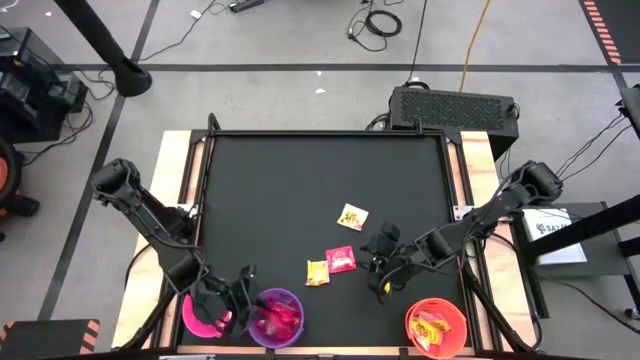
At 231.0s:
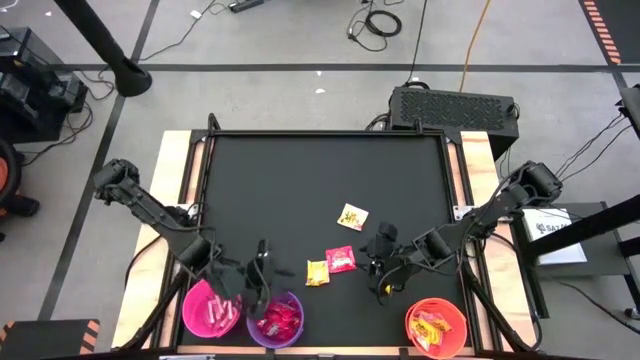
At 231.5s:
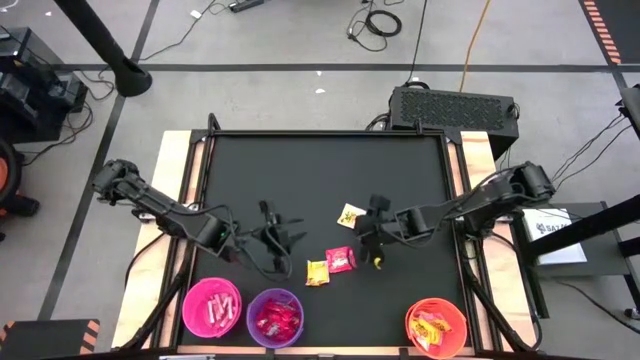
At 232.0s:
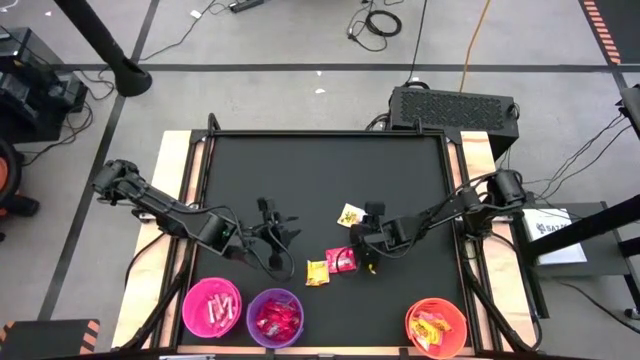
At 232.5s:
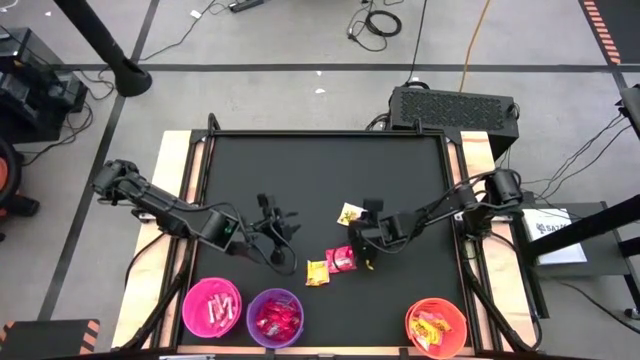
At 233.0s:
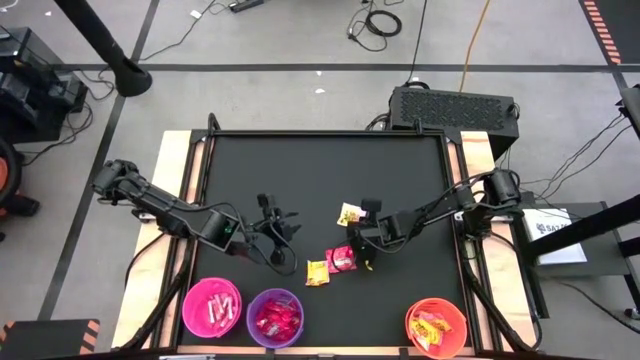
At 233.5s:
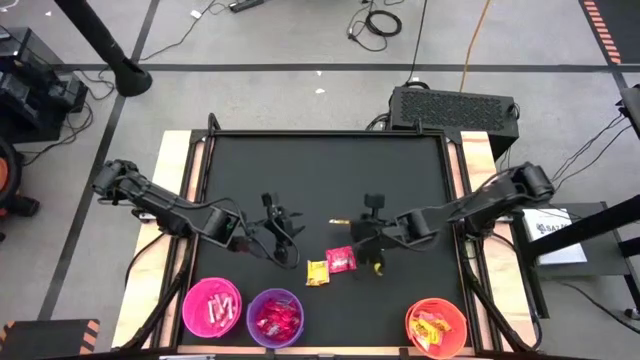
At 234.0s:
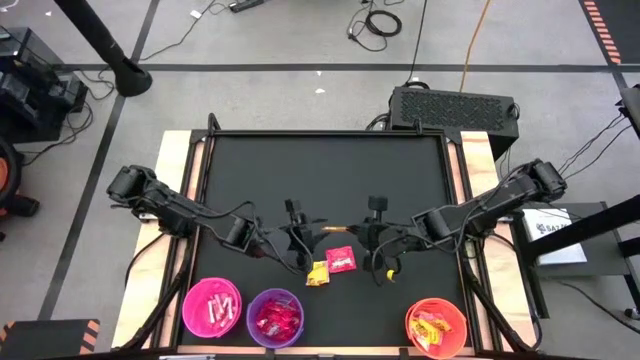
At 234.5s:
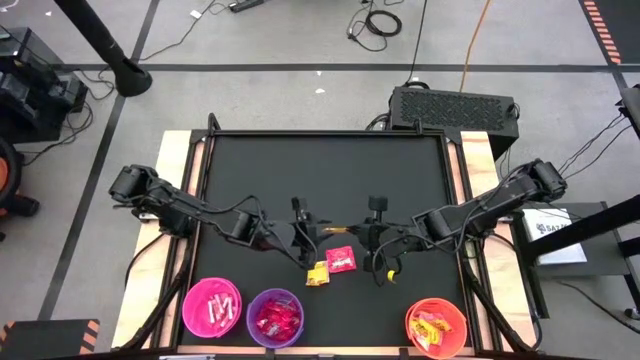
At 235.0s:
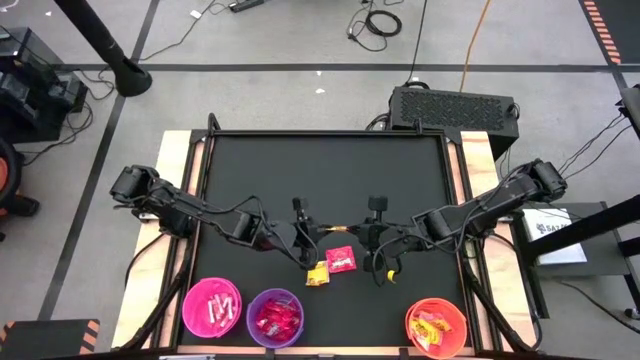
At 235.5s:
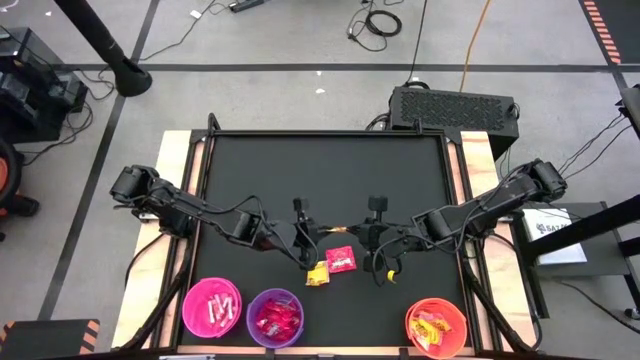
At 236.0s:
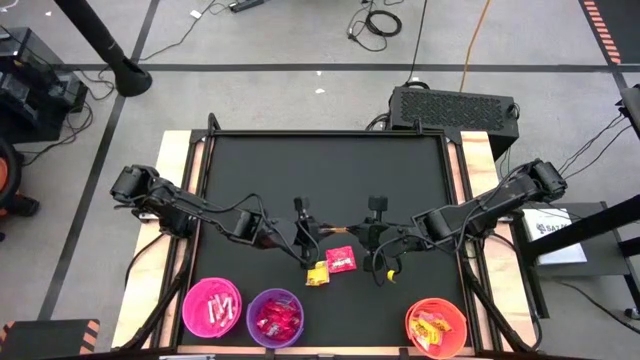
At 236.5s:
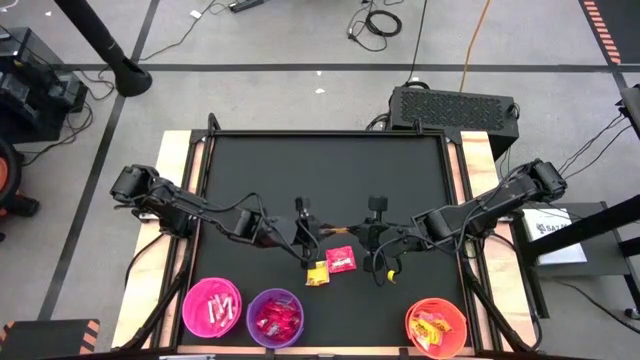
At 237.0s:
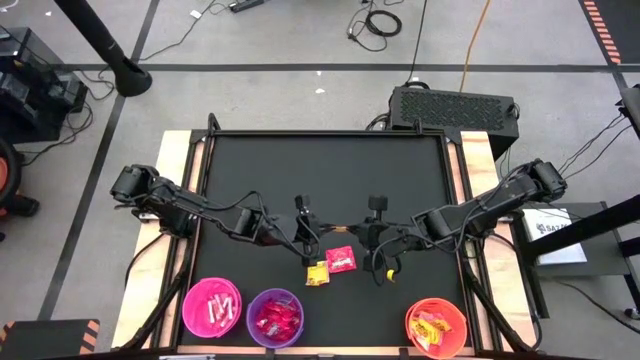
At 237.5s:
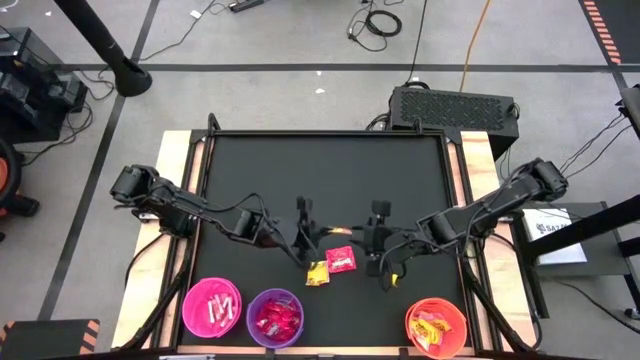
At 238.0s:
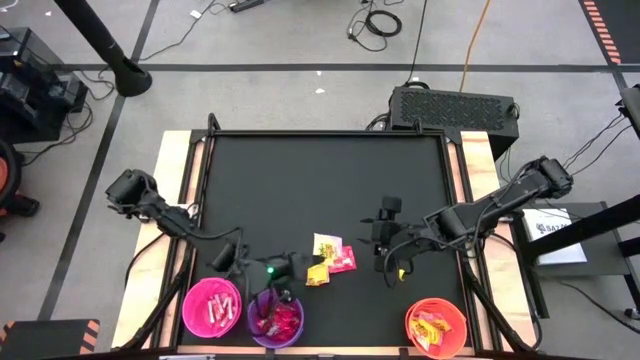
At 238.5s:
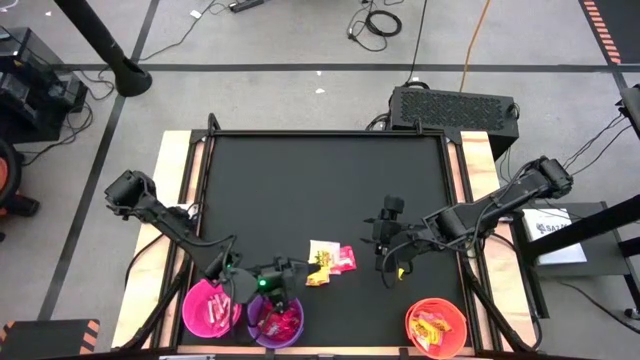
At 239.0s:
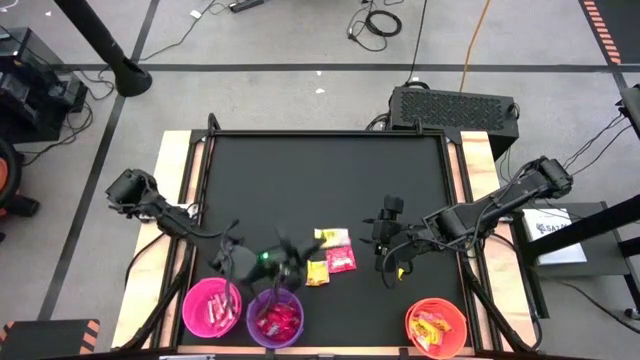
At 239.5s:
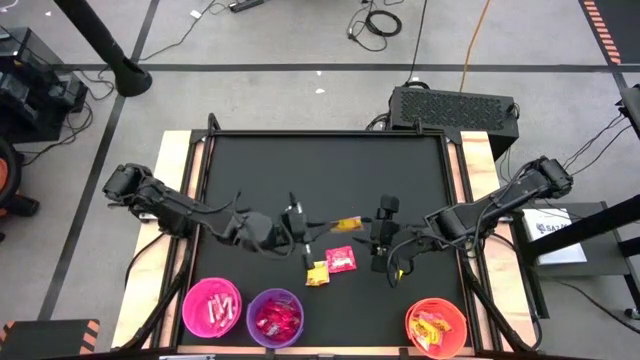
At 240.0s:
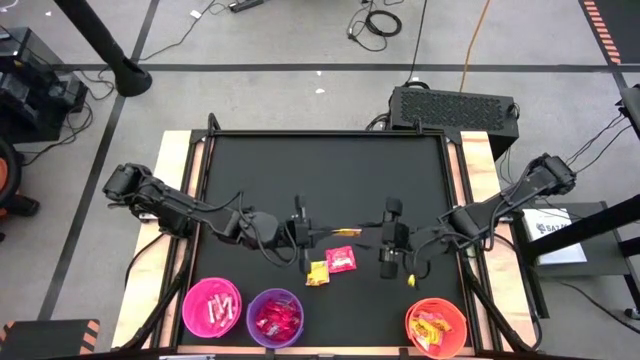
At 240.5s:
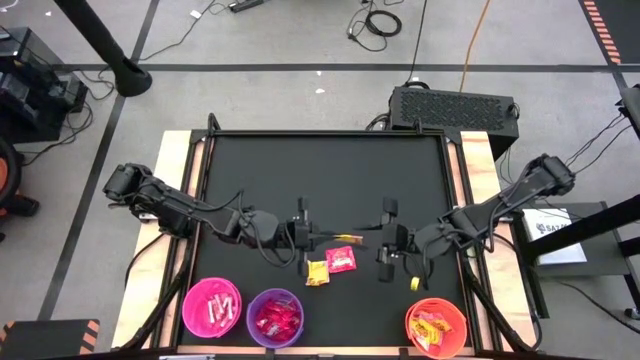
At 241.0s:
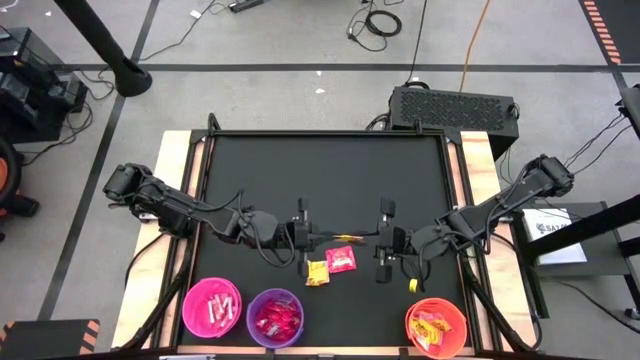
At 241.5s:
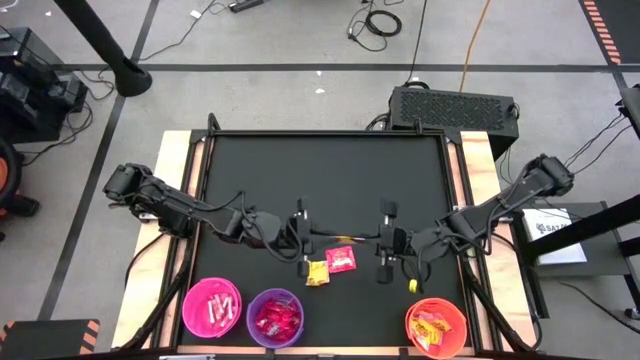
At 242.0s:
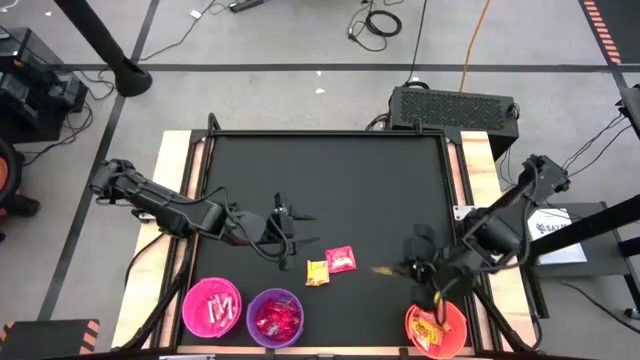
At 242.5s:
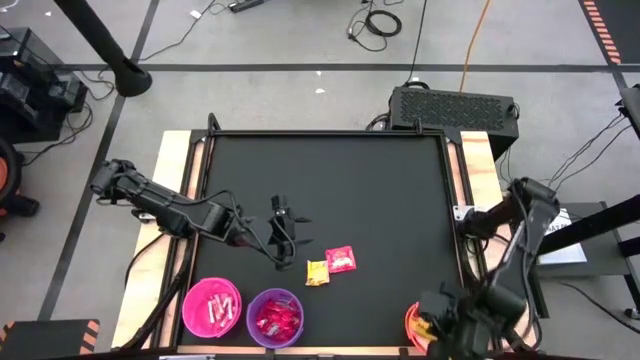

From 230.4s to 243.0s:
Task: Sort candy by brand, put in halloween buckets
Put the yellow candy into the orange bucket

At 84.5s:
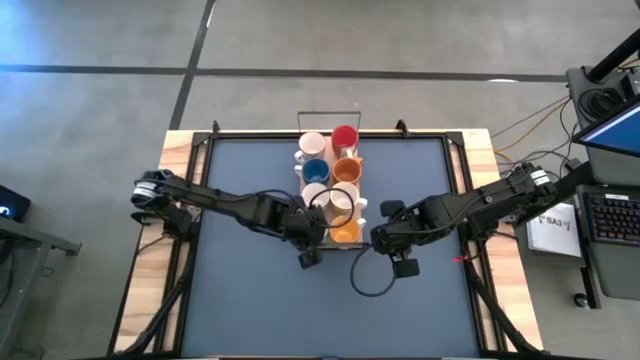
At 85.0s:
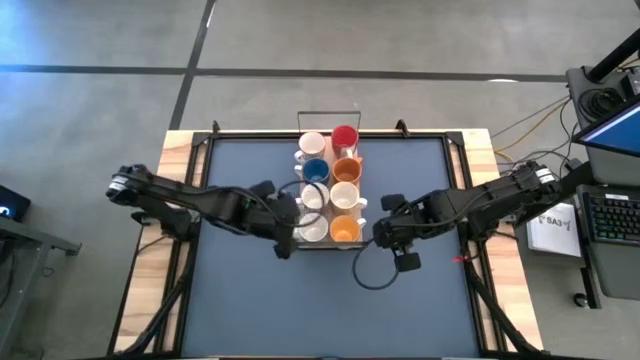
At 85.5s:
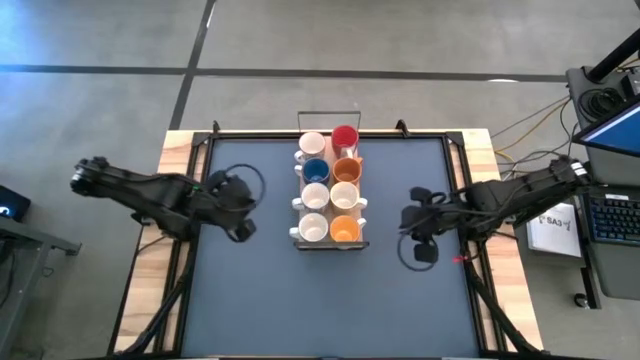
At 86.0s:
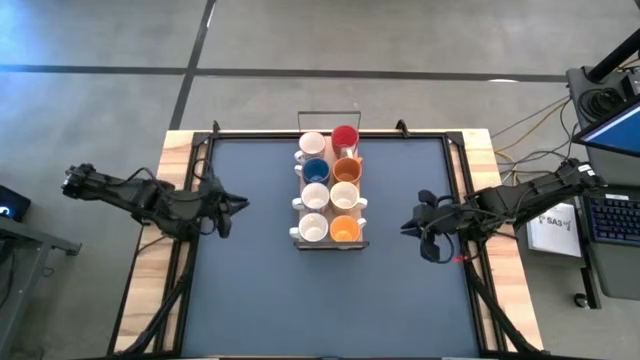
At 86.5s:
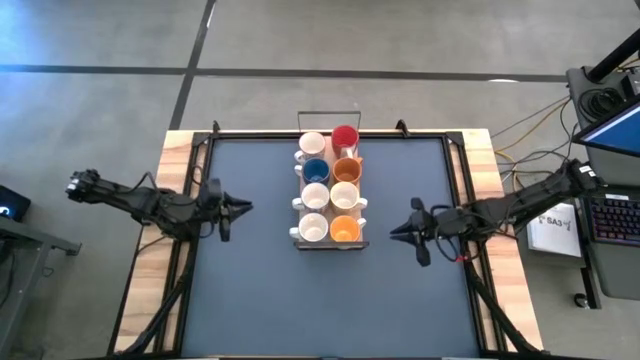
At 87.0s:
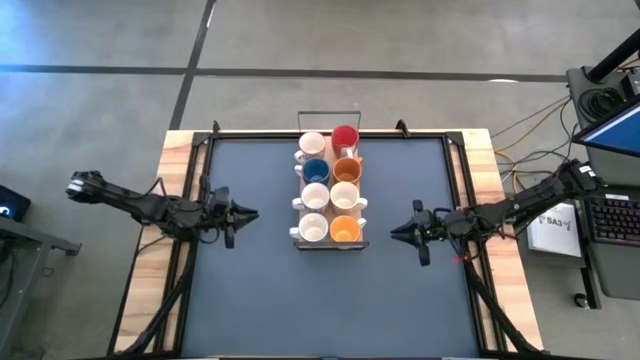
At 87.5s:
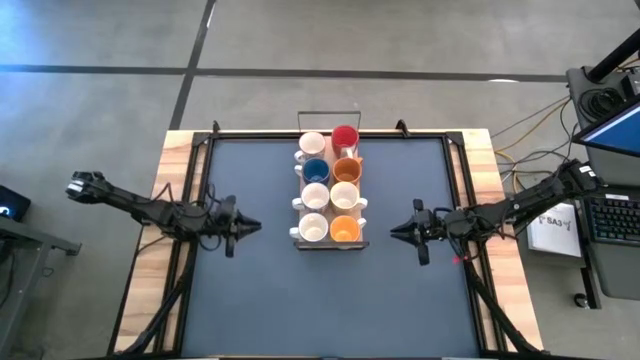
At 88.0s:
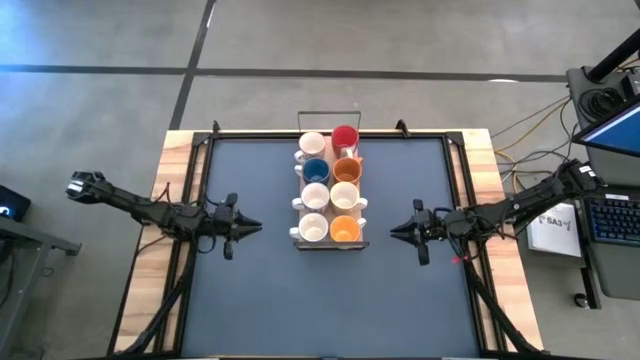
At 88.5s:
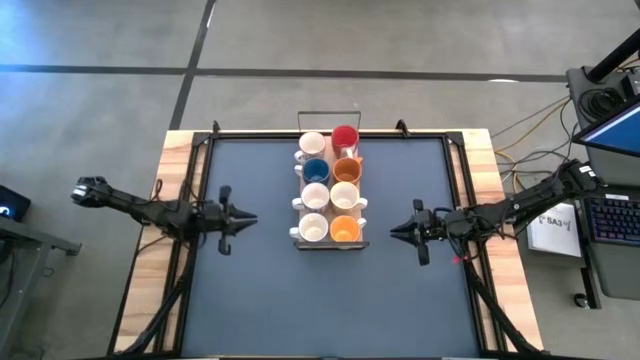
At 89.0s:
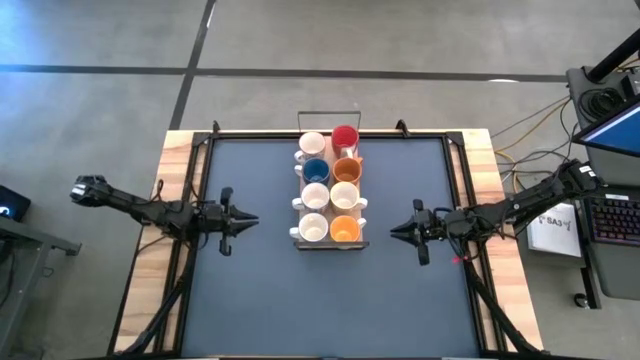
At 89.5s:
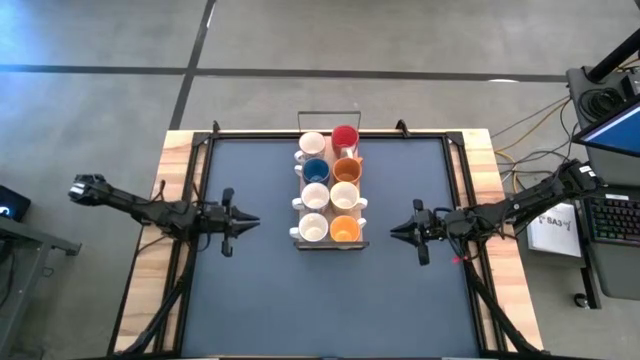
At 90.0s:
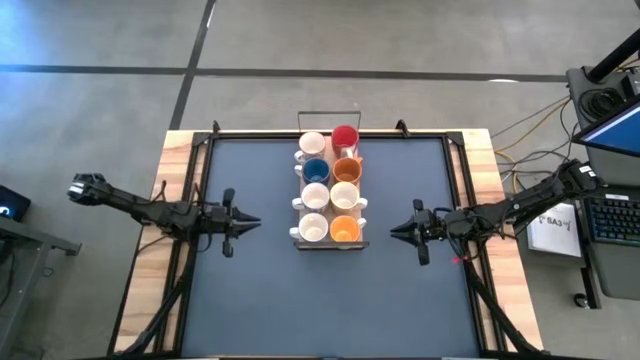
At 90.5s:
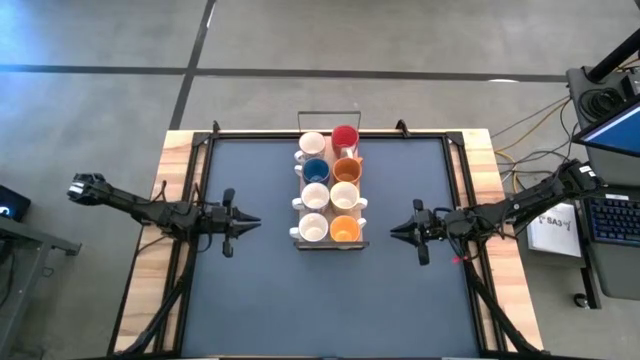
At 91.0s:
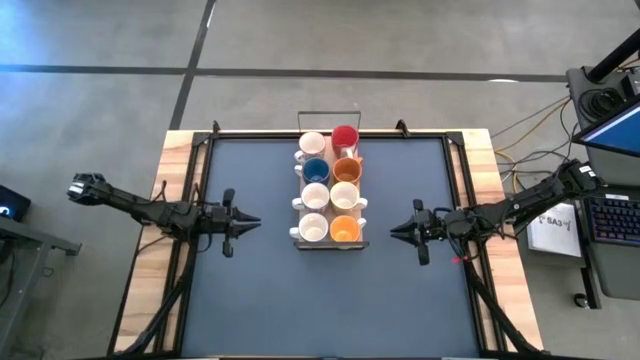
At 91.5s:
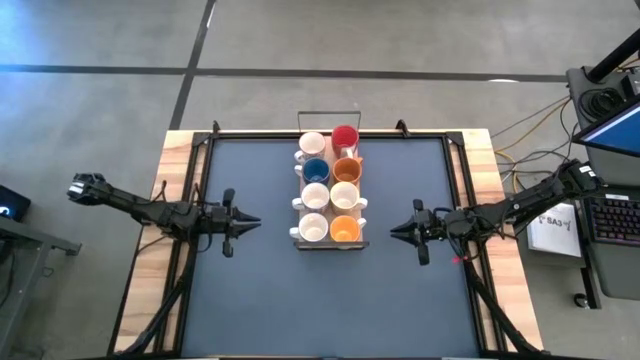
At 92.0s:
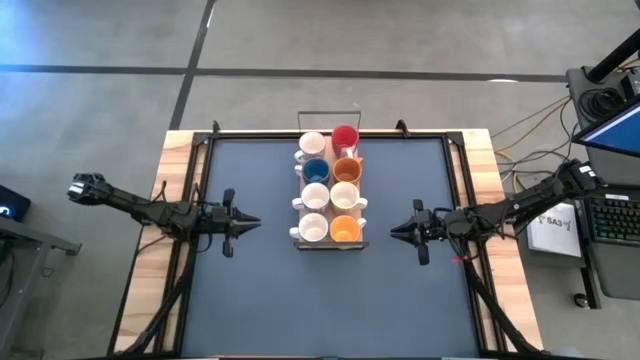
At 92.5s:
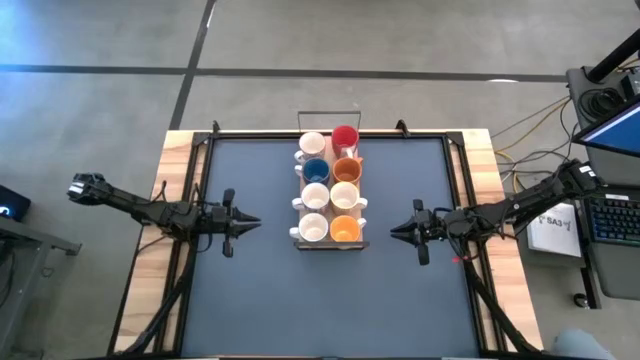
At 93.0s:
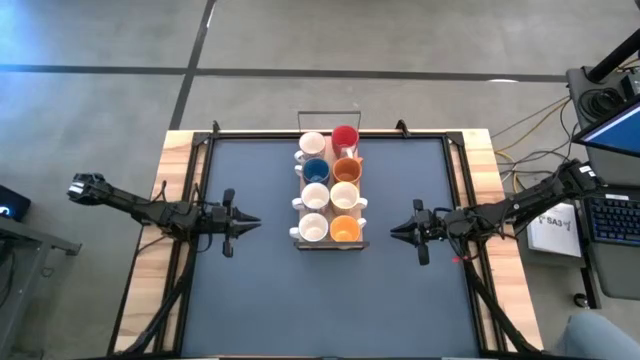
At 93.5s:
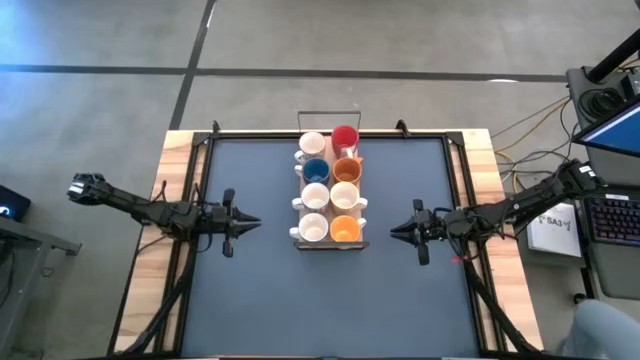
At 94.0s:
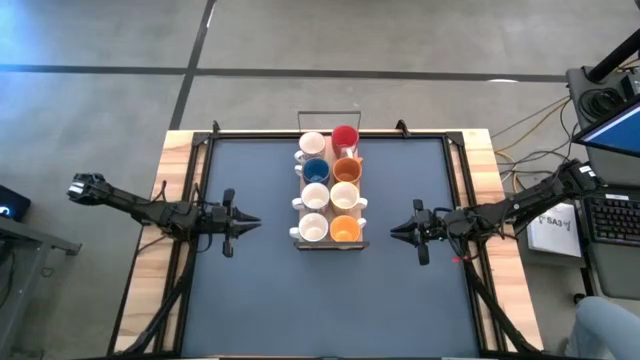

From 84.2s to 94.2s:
Task: Place coffee mugs
Return to Home Position
